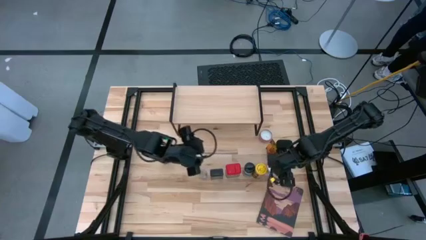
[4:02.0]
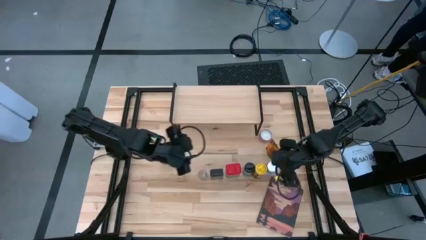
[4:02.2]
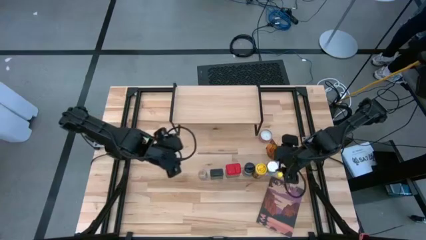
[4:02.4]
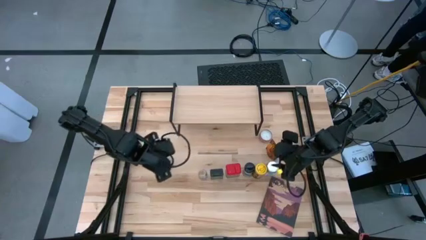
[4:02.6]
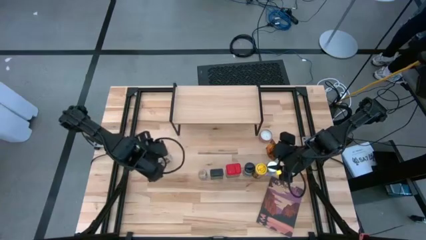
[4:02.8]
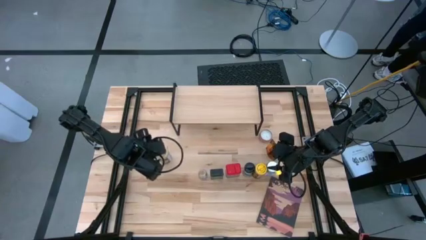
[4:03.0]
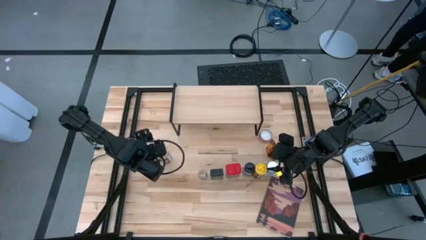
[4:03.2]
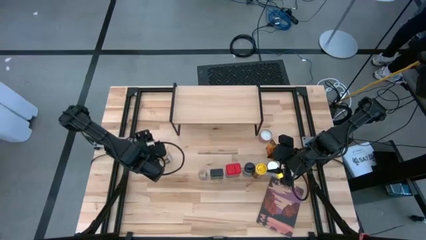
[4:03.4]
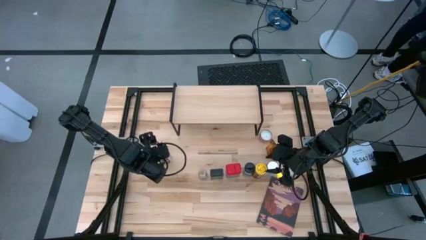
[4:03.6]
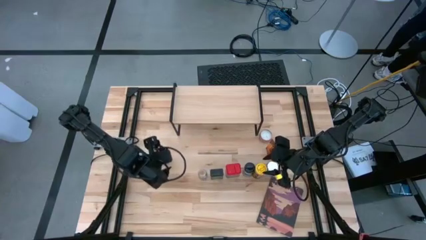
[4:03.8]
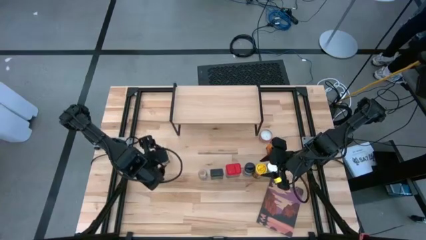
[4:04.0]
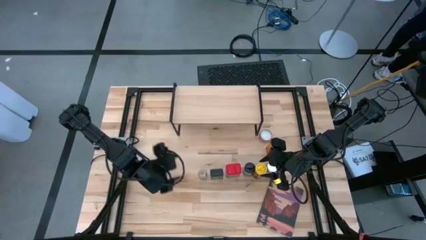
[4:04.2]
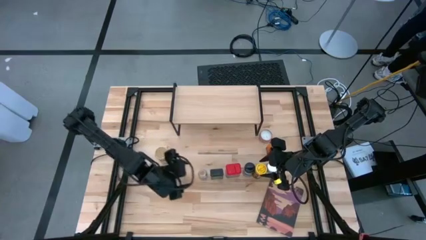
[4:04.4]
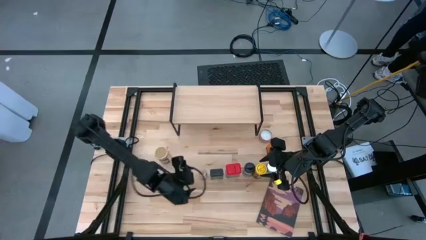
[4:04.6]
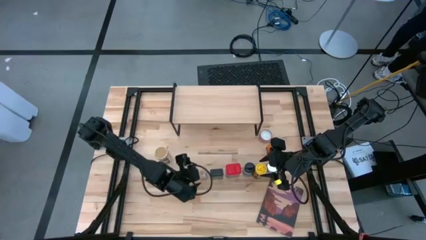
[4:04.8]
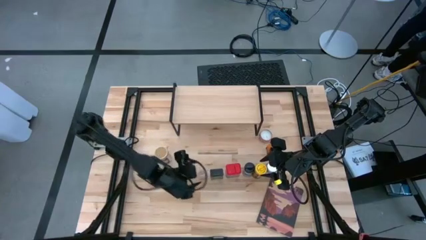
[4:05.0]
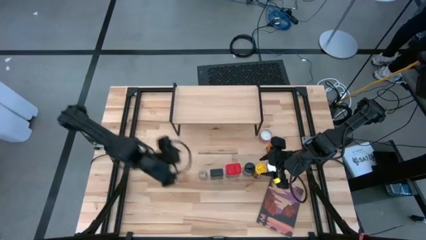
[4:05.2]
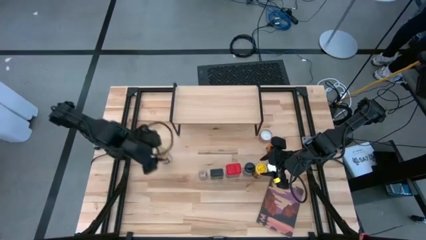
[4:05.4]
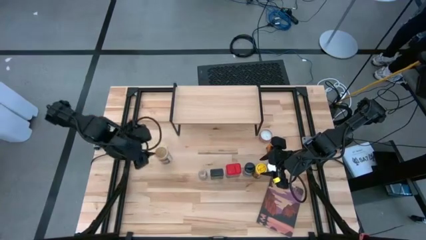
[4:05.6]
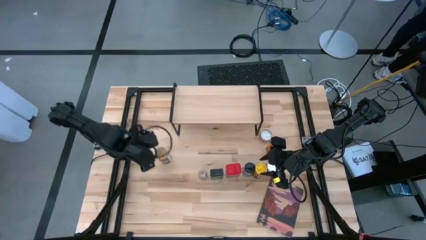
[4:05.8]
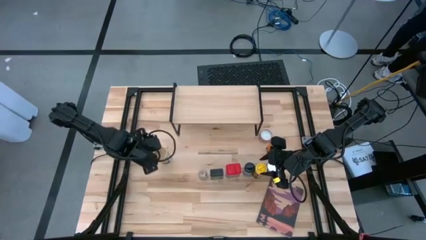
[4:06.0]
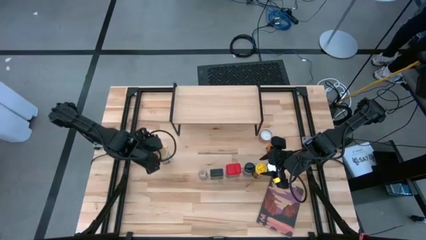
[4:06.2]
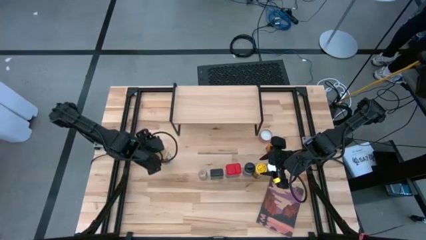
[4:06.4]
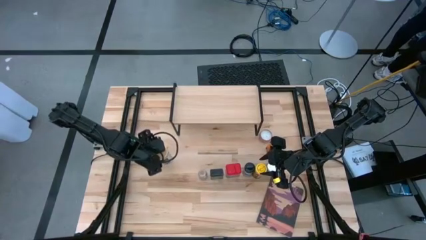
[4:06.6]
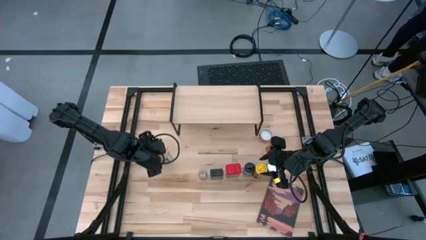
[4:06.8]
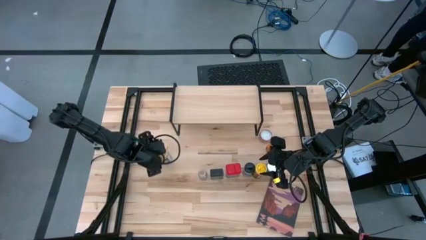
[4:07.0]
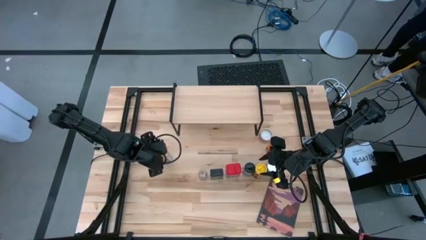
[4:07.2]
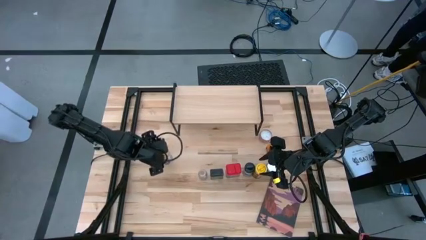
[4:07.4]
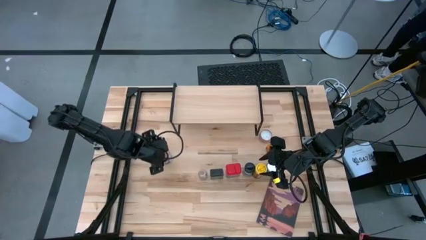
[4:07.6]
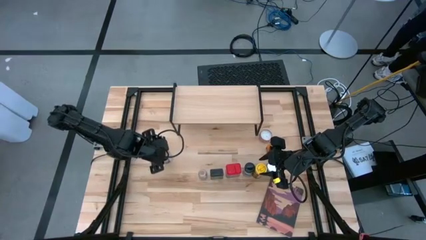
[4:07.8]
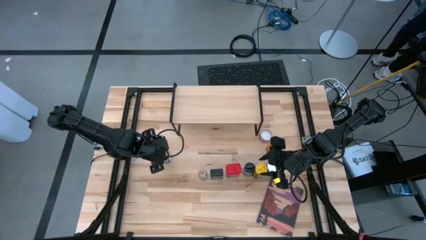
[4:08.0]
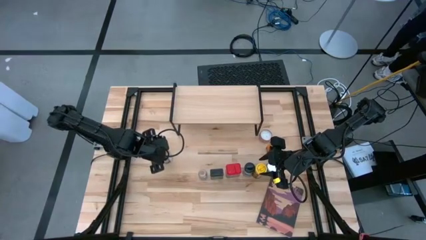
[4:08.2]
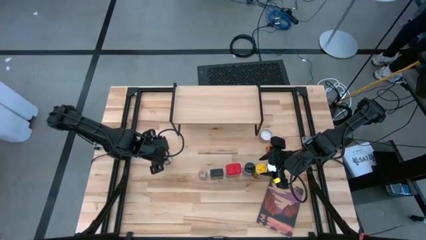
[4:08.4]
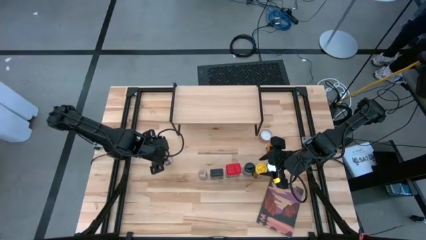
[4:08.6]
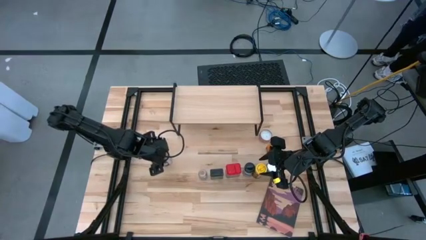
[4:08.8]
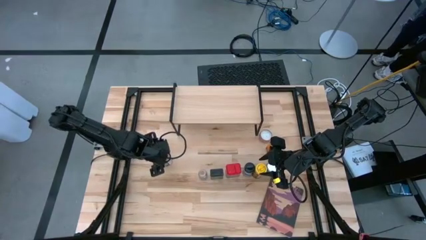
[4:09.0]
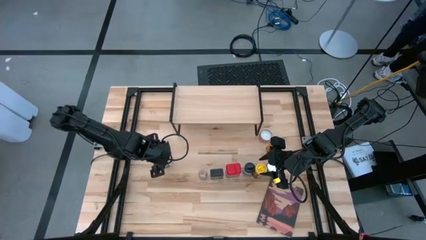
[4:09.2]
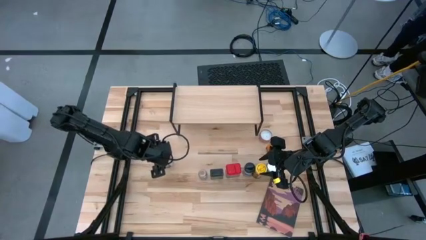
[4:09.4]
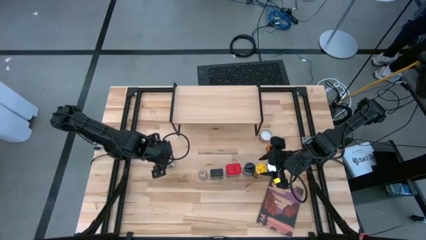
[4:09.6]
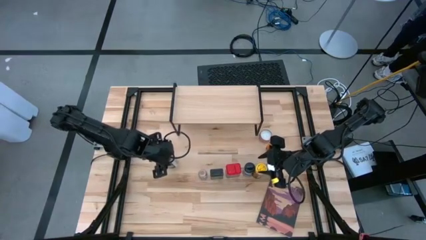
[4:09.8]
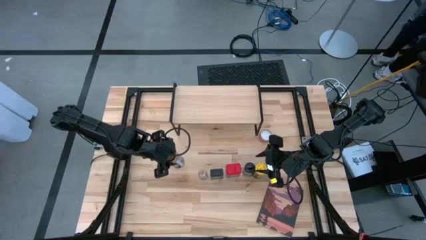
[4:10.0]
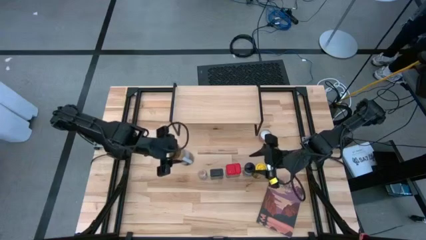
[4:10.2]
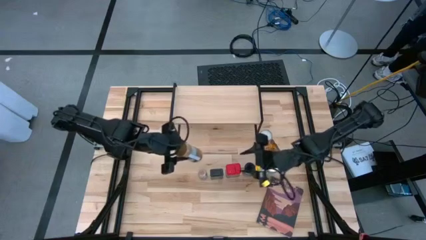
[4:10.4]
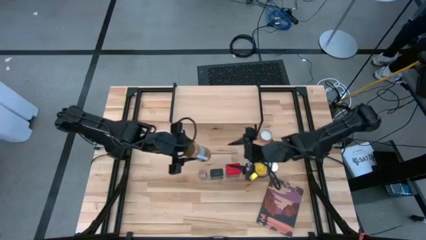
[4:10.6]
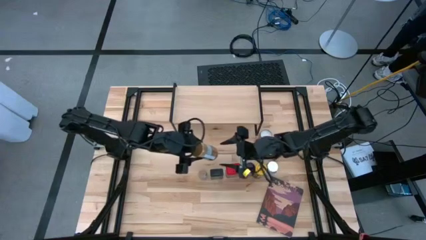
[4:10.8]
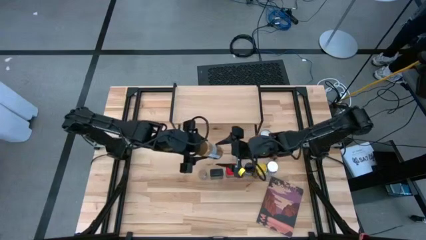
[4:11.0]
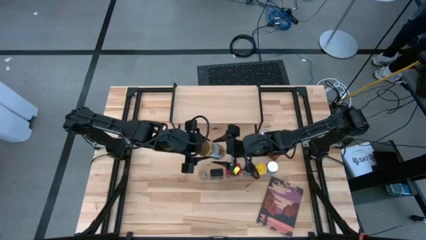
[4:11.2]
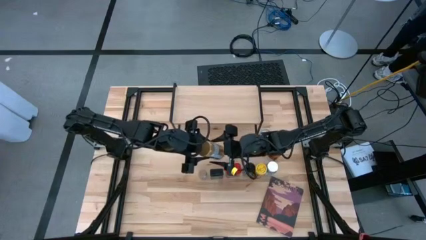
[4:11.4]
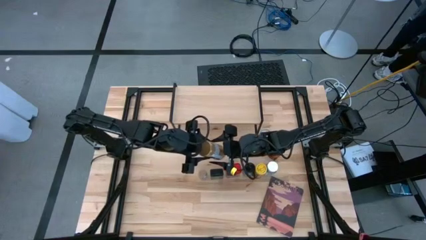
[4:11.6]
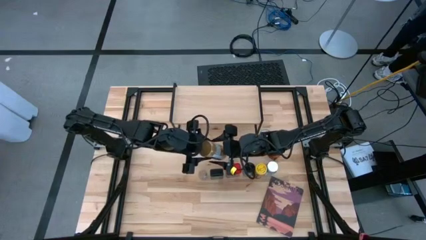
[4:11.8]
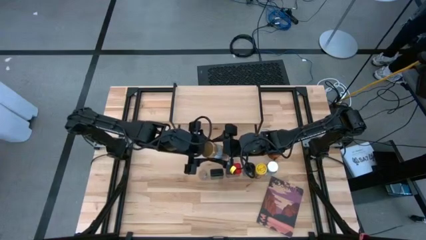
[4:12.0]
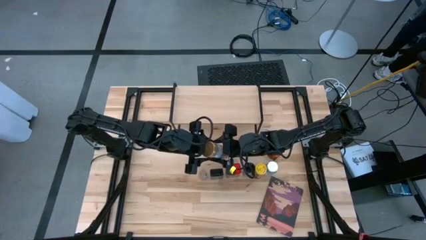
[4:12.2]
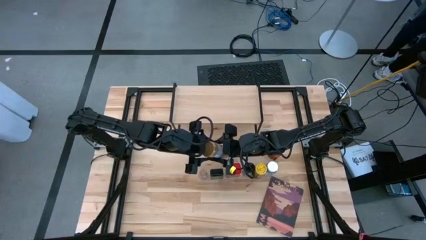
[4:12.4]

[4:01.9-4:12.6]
Task: Shelf spices
Put the brown spice bottle in the bottom center of the table

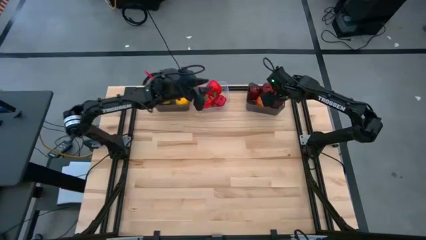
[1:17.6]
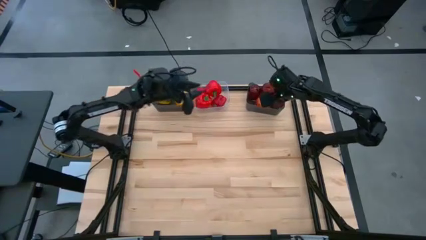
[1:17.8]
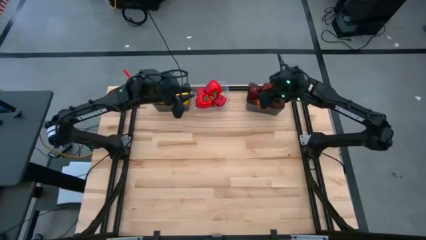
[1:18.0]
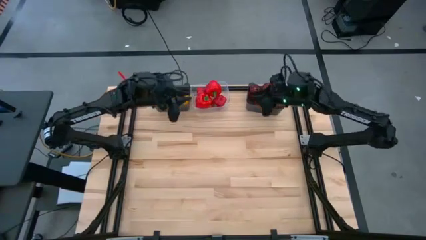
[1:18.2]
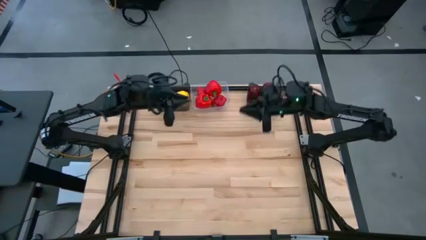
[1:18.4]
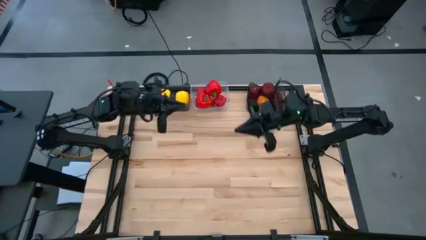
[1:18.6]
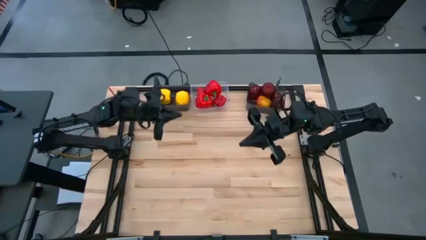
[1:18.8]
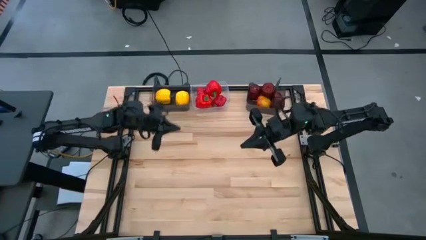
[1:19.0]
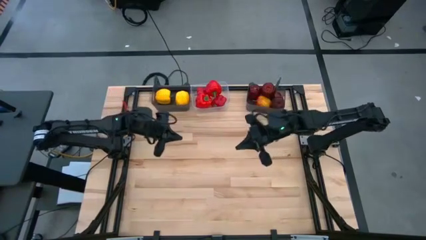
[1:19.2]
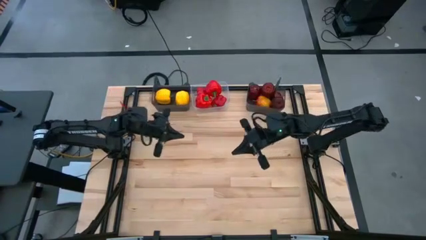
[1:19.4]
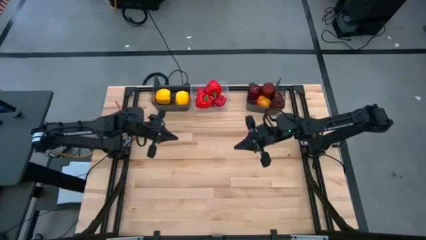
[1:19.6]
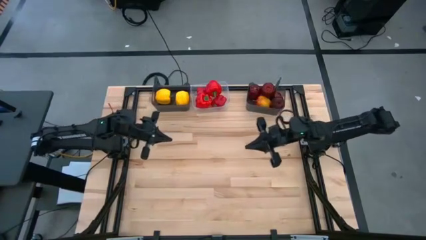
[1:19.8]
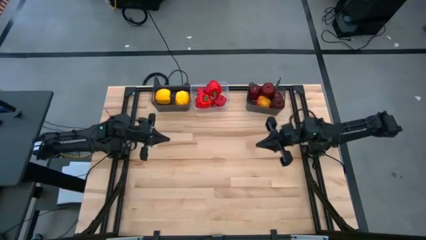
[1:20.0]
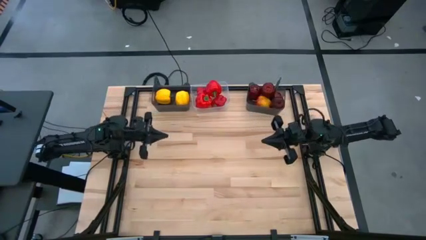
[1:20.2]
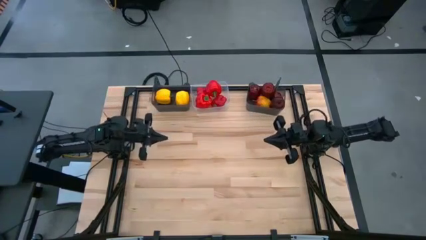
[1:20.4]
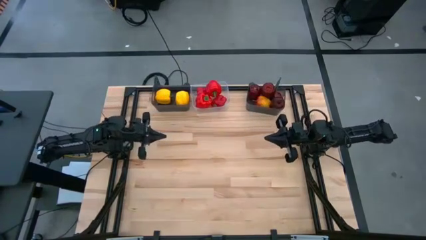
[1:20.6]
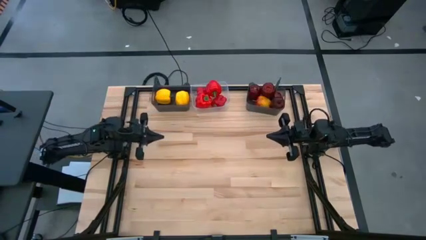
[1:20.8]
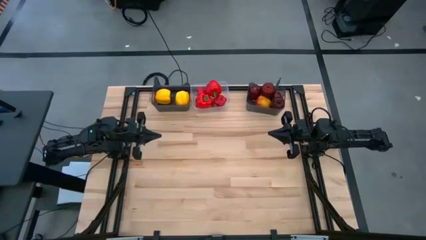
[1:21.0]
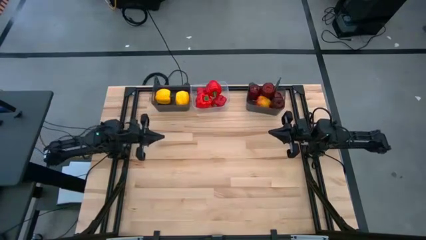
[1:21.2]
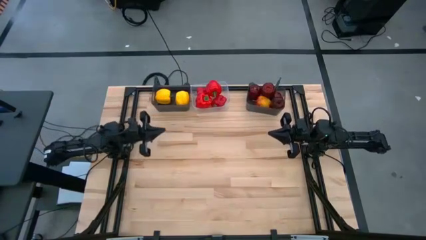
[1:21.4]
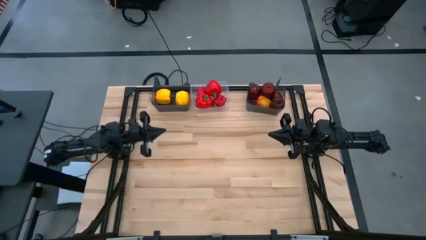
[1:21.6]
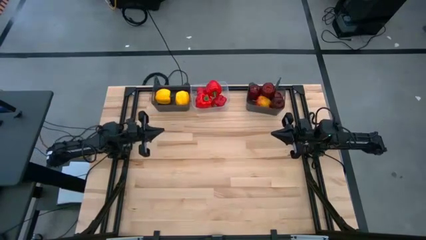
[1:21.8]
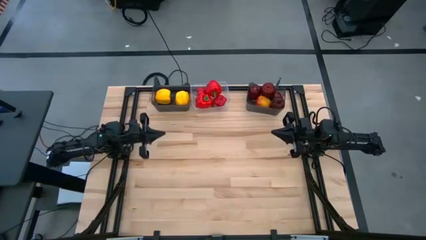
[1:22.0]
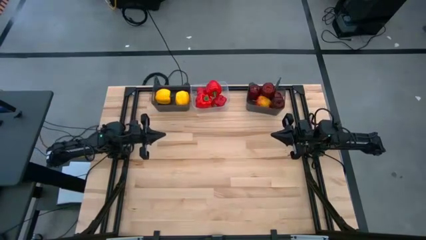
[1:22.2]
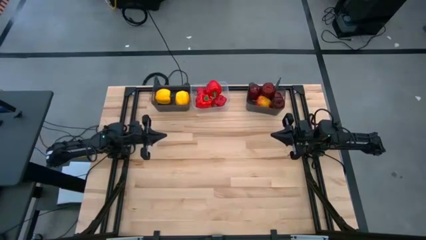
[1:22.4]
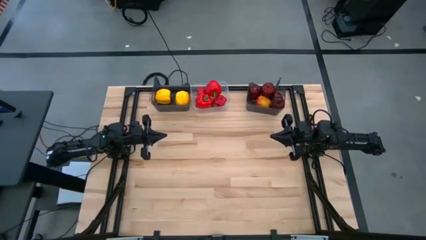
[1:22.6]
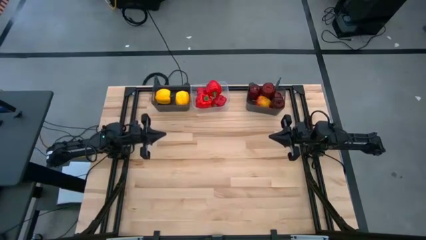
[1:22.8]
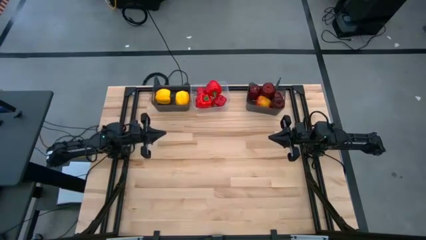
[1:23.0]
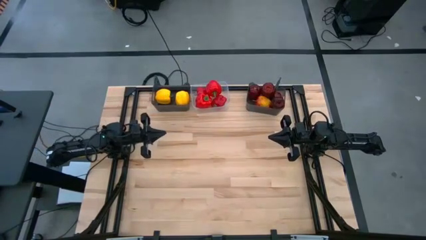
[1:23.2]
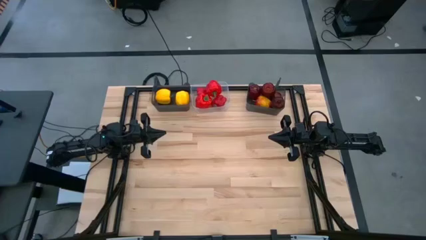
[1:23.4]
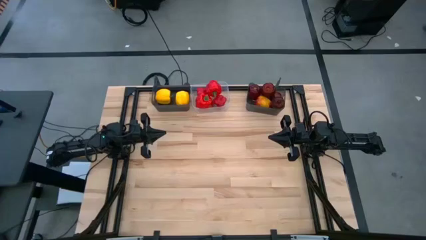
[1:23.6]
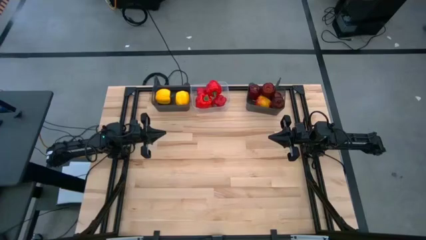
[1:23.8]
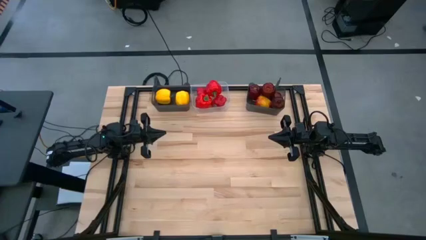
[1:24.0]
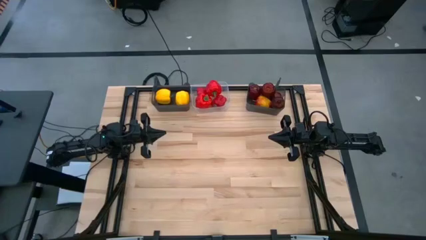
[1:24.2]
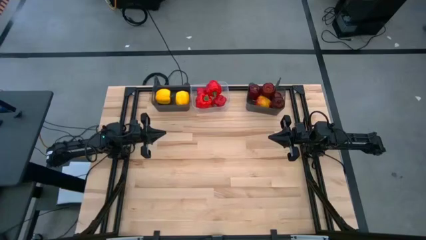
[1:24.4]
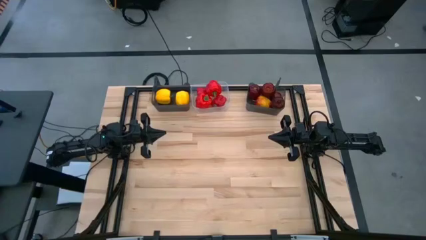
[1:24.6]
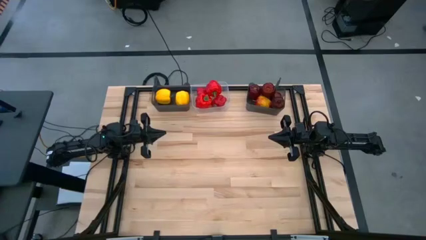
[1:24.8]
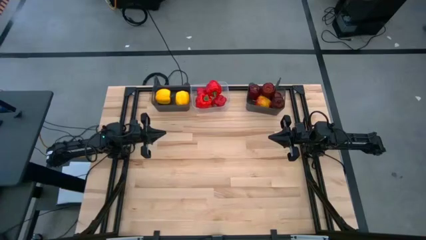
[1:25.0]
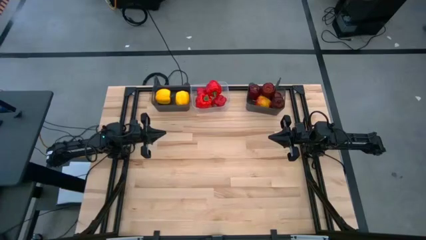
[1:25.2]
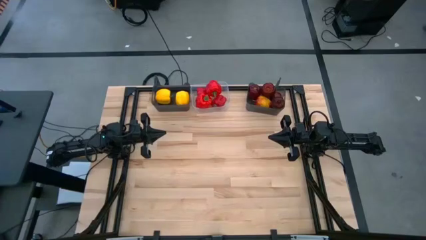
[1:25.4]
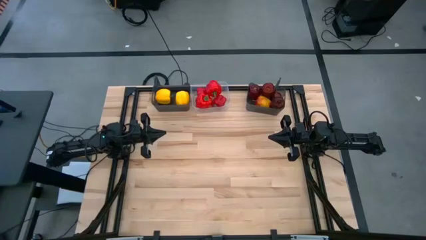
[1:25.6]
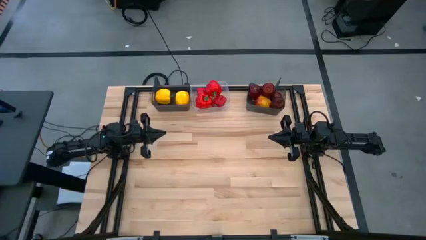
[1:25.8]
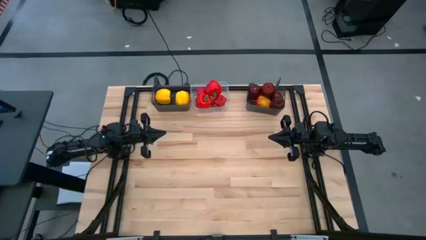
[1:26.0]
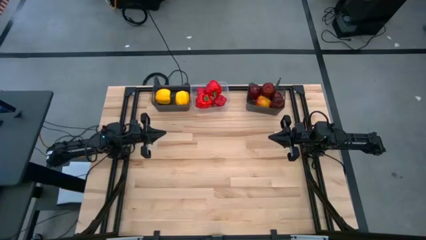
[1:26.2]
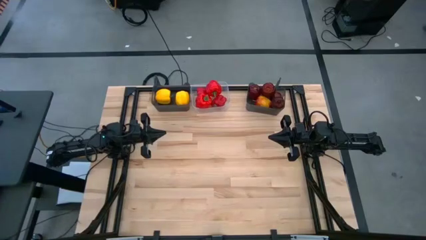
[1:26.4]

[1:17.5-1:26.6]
Task: Sort produce into baskets
Return to Home Position
